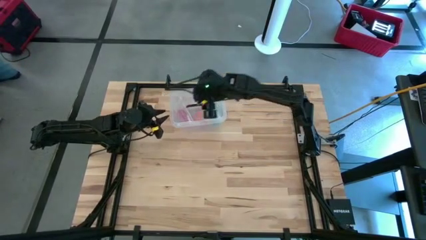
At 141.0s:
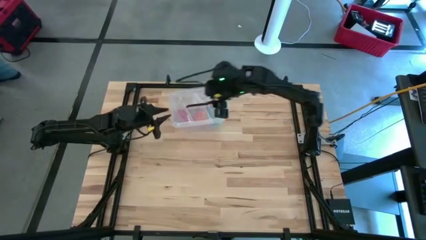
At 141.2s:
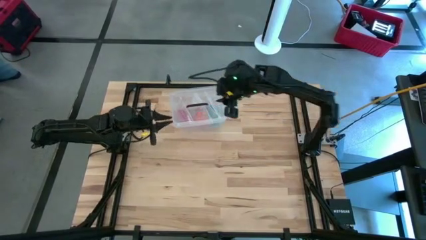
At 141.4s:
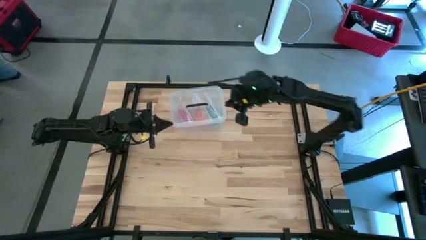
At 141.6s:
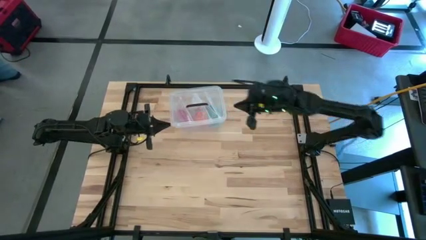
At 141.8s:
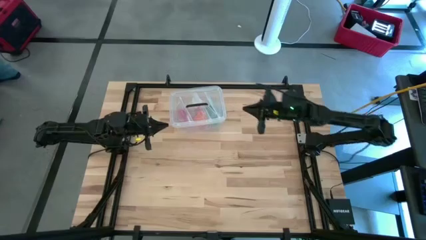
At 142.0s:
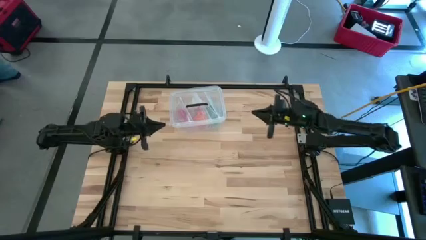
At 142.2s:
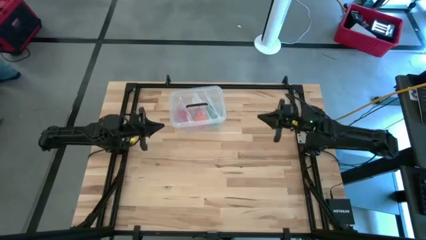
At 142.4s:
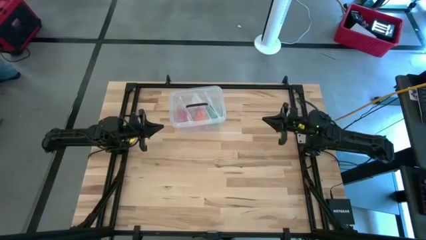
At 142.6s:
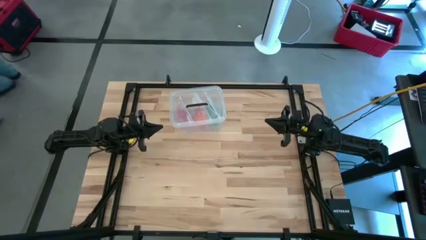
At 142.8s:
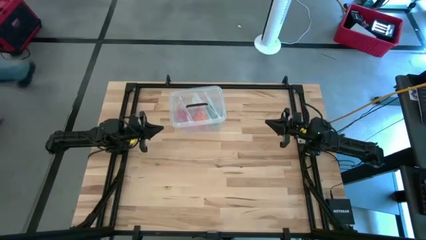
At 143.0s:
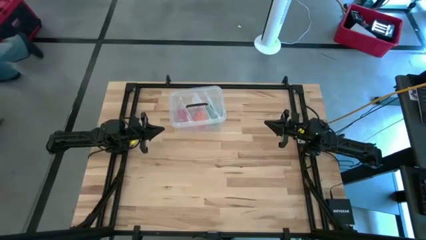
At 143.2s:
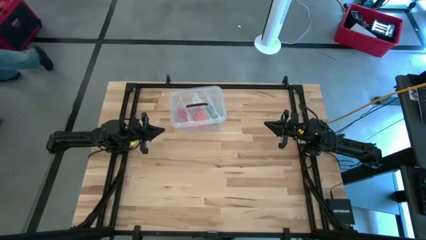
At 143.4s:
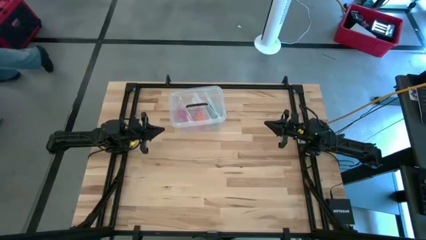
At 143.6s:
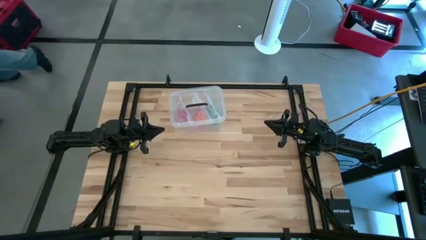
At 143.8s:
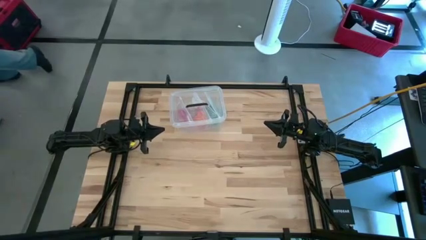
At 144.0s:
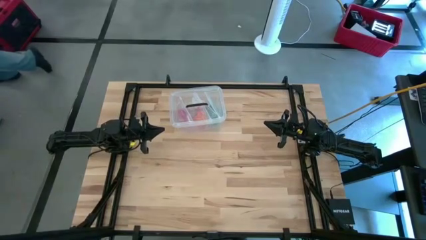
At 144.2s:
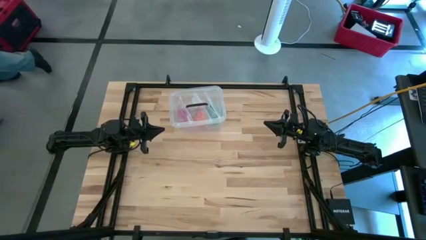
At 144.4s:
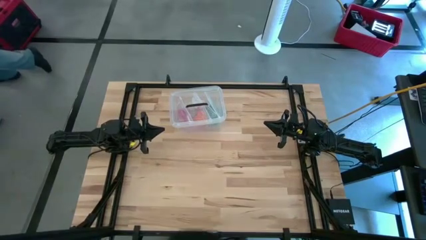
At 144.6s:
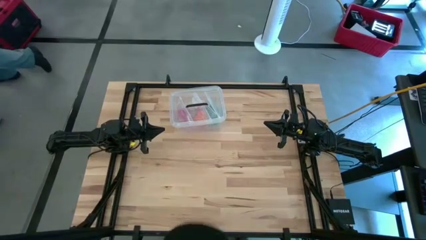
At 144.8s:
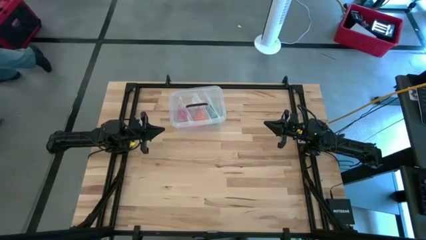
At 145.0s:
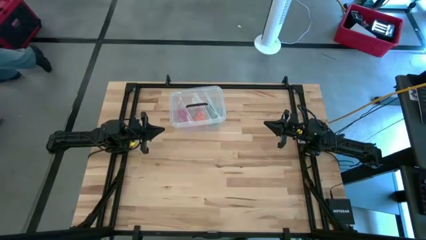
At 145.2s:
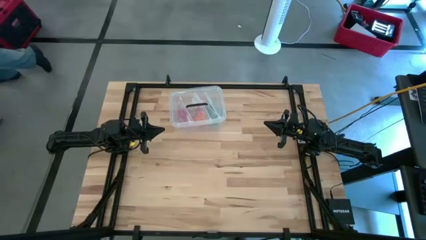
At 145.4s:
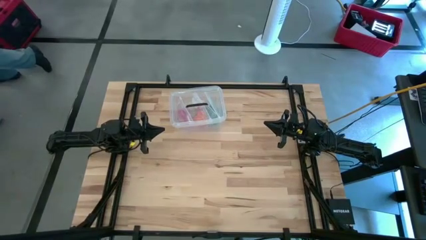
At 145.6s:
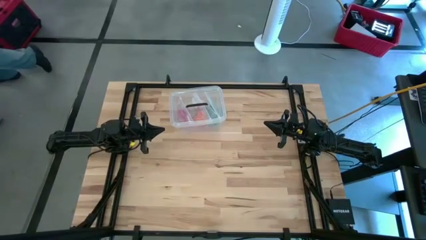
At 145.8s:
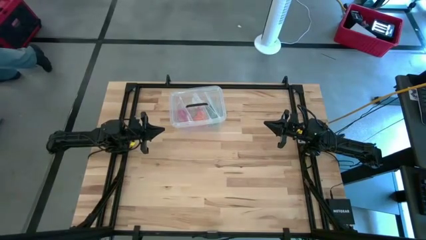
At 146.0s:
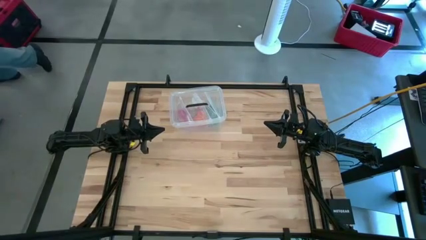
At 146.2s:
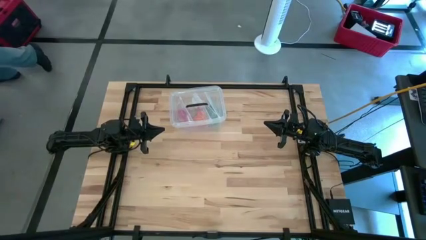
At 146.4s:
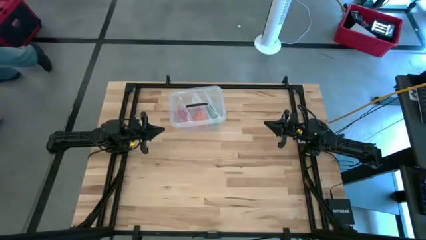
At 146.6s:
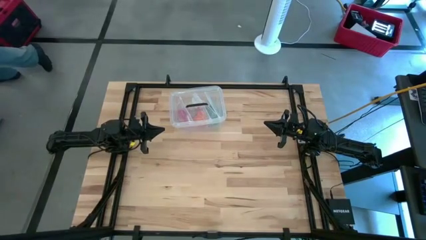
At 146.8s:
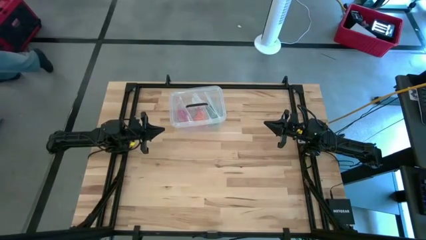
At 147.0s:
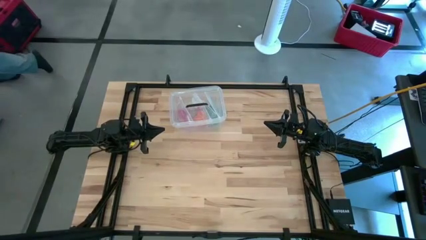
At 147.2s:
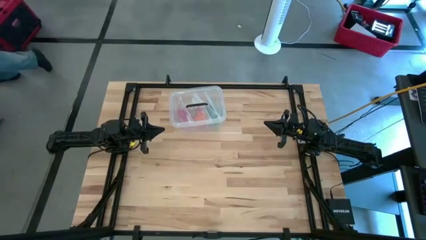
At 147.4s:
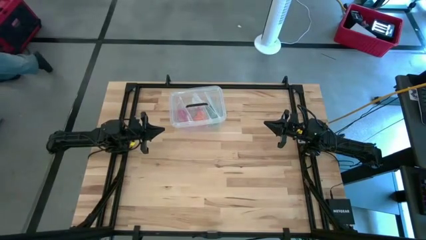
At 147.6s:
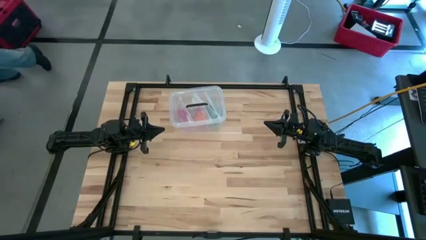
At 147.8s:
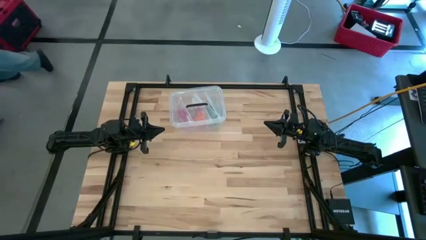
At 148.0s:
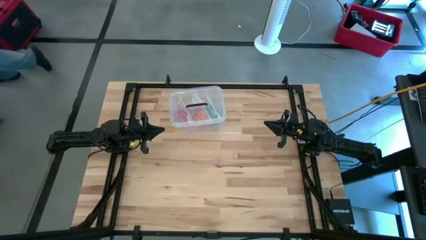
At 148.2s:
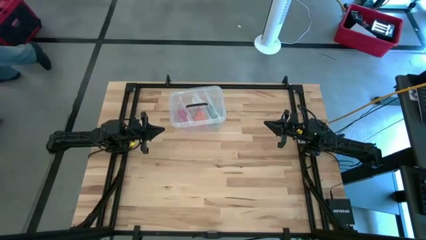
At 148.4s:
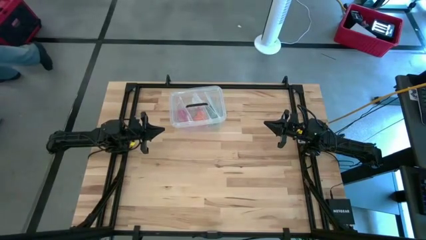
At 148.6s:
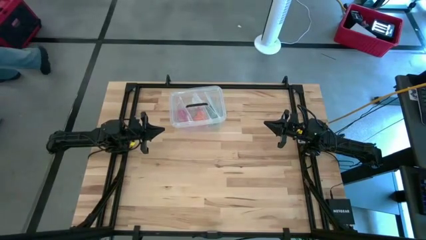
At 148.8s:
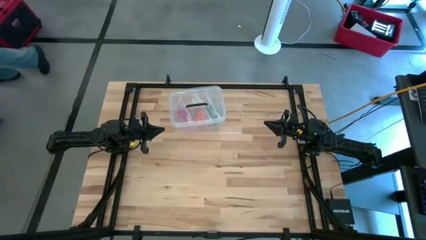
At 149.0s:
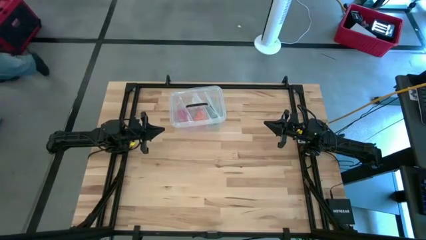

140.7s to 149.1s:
Task: Roll bandage
Return to Home Position

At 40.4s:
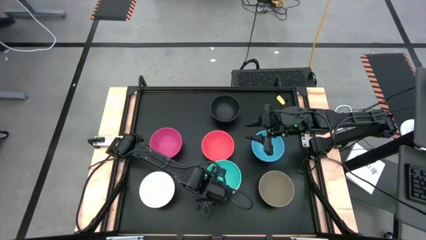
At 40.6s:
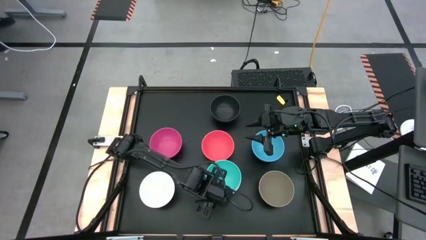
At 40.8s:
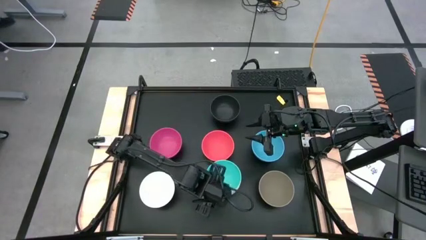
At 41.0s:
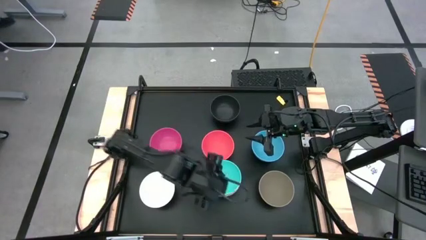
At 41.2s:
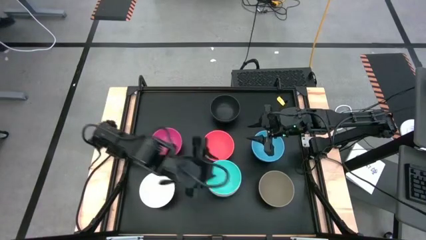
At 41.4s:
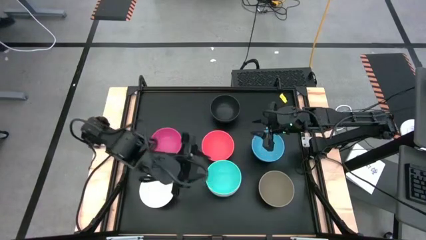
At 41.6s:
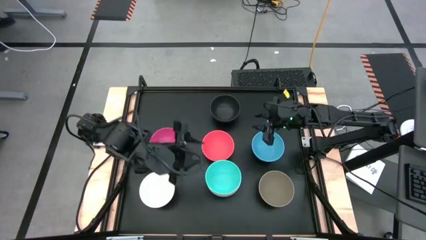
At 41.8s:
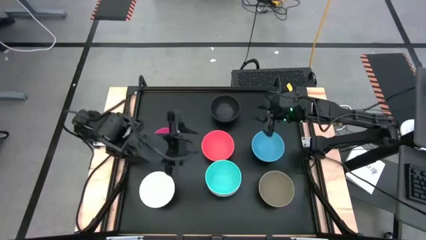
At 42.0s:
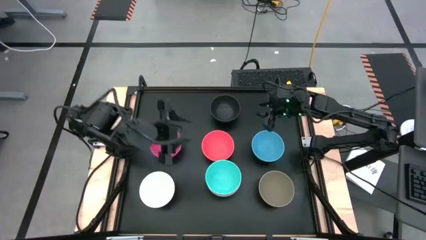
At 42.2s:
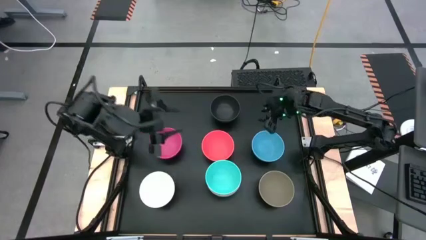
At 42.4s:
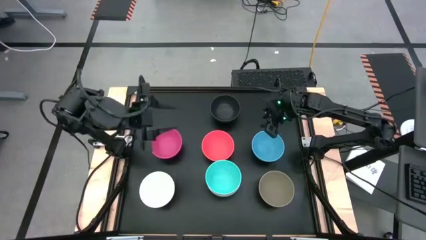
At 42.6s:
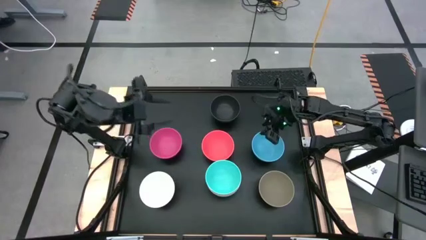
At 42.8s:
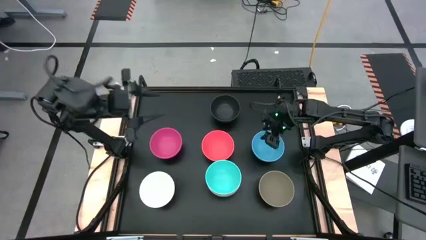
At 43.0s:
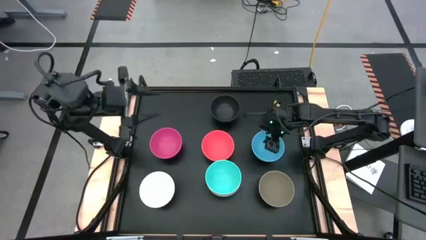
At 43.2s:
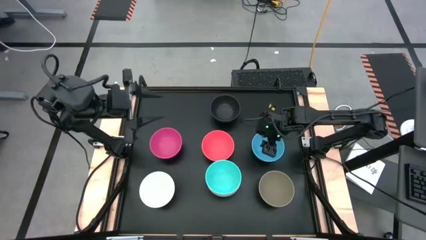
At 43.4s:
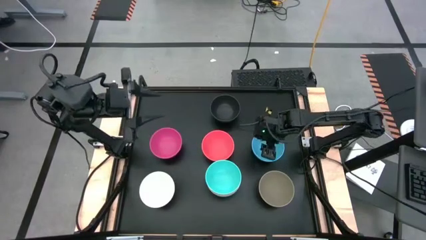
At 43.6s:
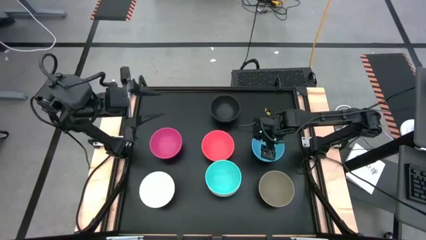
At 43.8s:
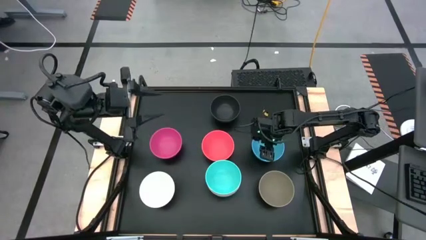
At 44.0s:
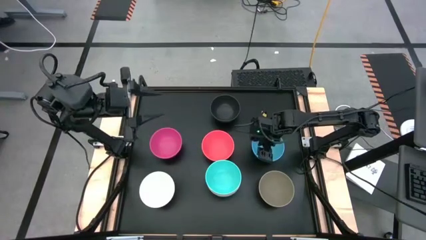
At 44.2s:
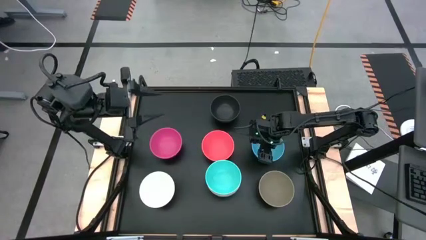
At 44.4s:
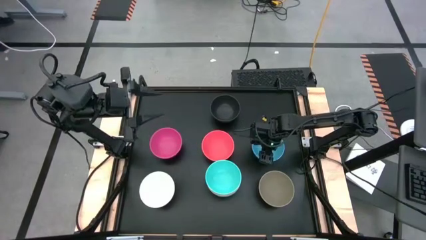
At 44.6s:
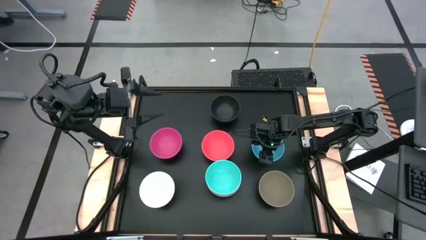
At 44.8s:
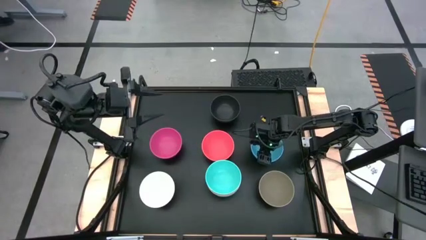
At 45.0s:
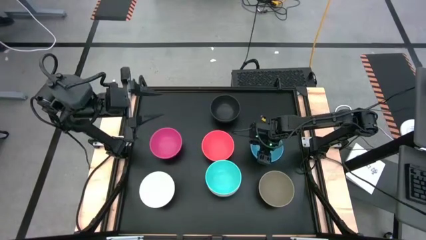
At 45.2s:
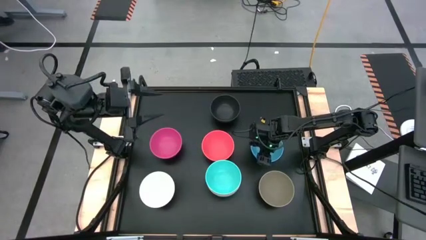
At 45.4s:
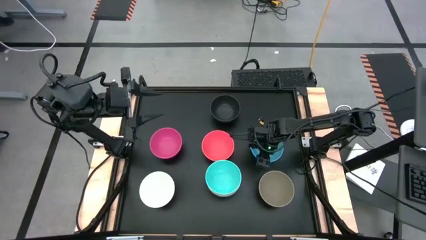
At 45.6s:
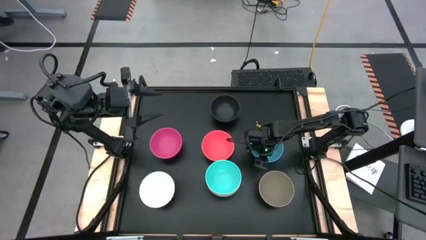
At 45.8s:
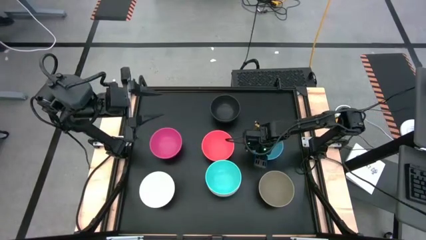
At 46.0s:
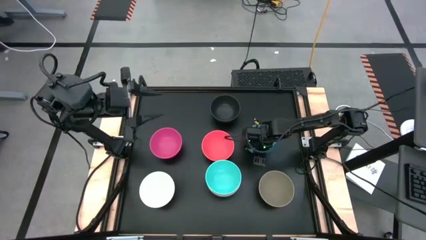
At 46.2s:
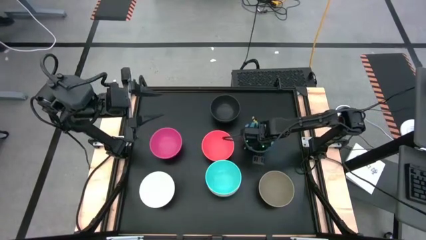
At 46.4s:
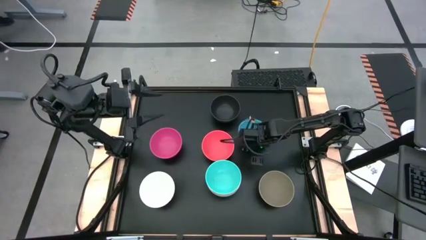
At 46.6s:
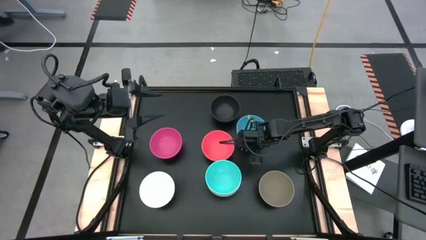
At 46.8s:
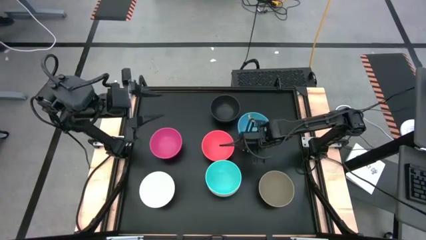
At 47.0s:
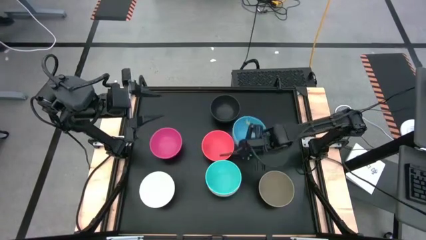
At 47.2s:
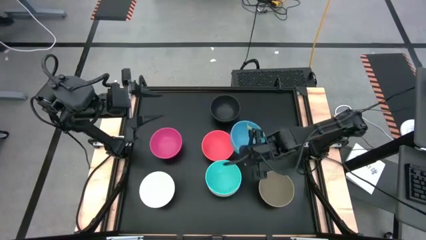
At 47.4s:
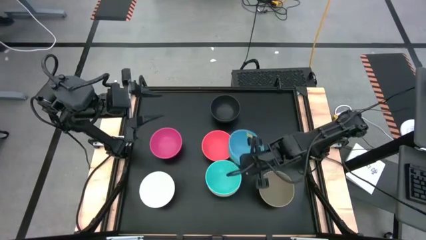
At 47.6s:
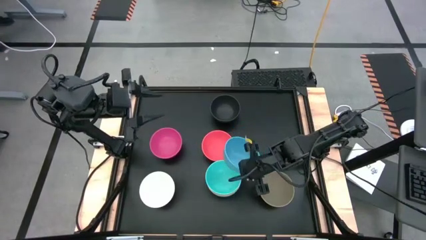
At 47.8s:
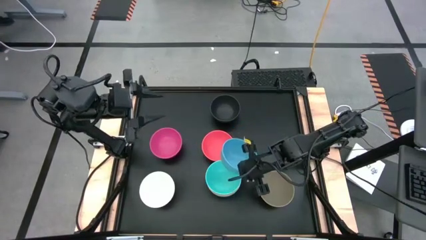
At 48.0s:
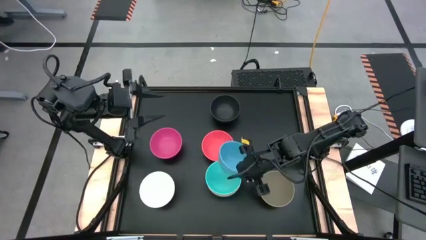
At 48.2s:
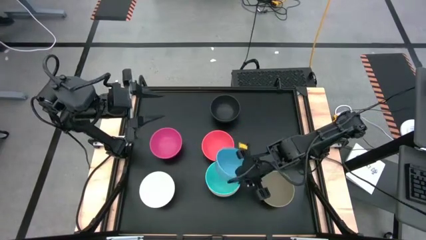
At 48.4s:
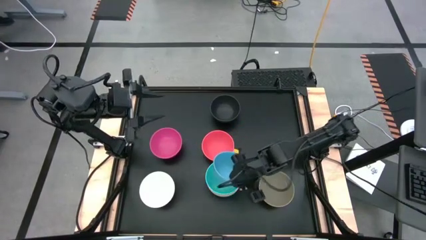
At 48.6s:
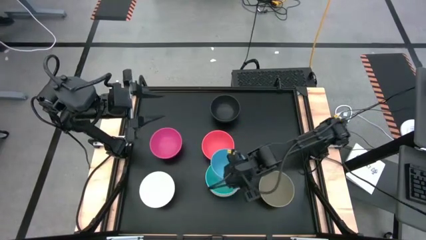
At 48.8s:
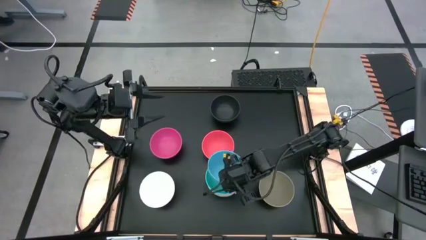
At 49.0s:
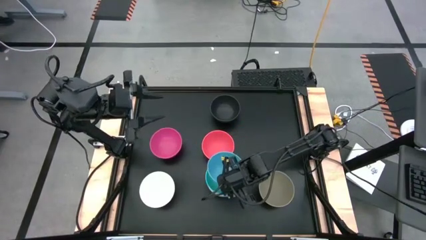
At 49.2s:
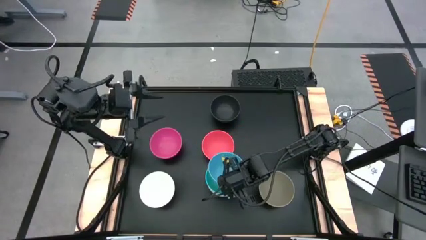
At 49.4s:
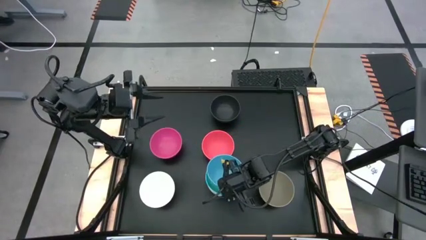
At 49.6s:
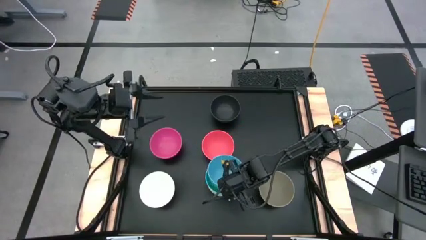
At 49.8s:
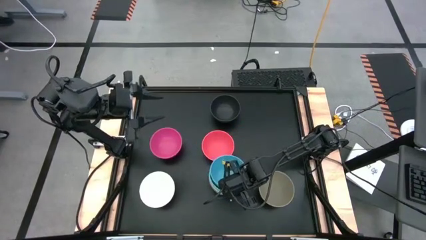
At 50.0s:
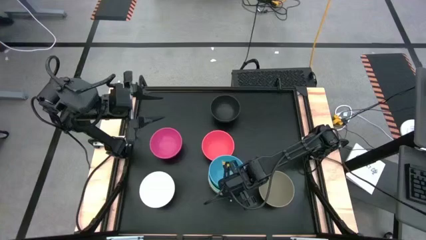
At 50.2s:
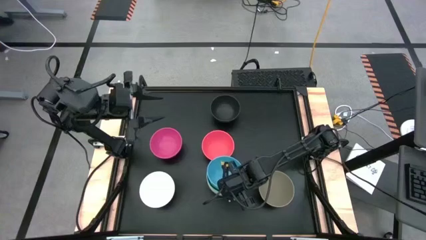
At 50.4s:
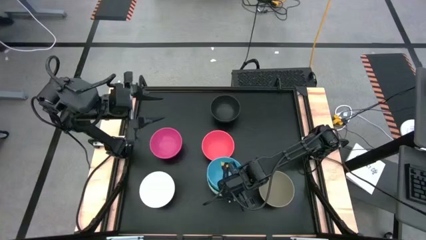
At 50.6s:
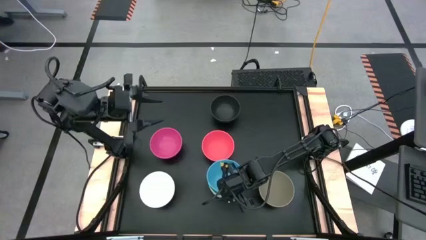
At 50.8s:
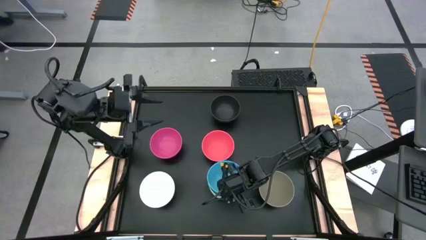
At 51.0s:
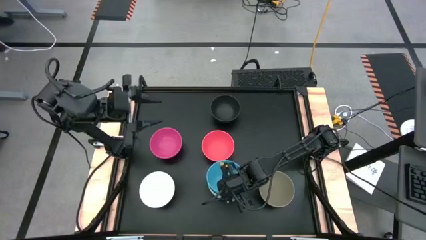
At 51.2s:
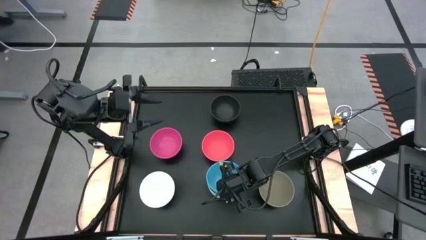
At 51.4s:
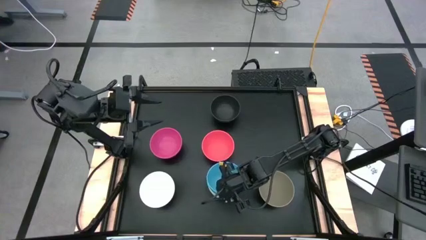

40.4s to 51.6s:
Task: Nest bowls inside each other
Stack the blue bowl on top of the light blue bowl
